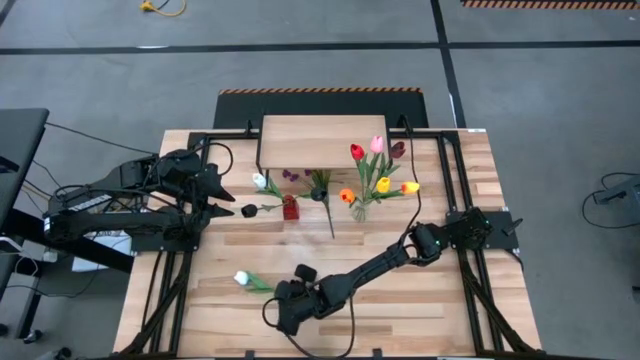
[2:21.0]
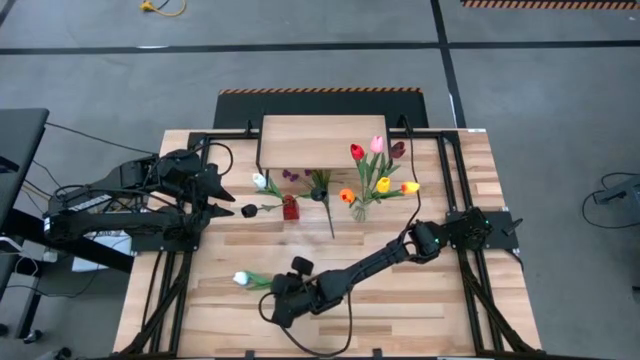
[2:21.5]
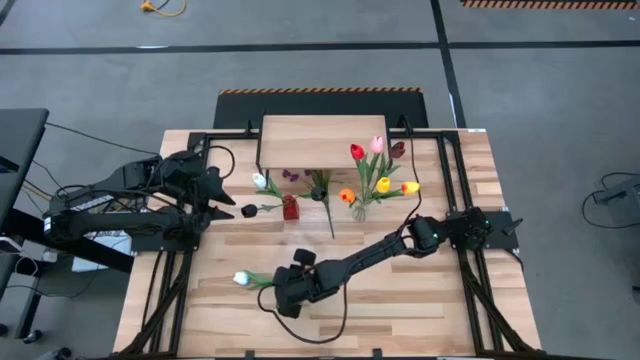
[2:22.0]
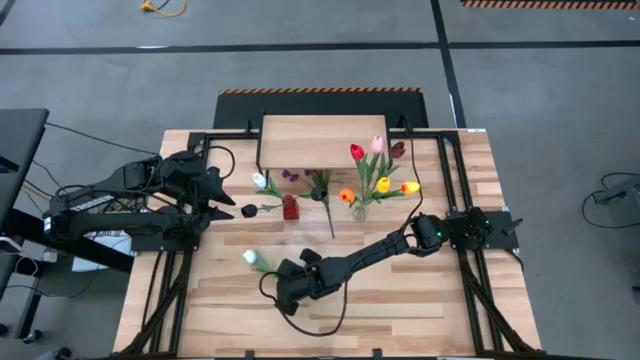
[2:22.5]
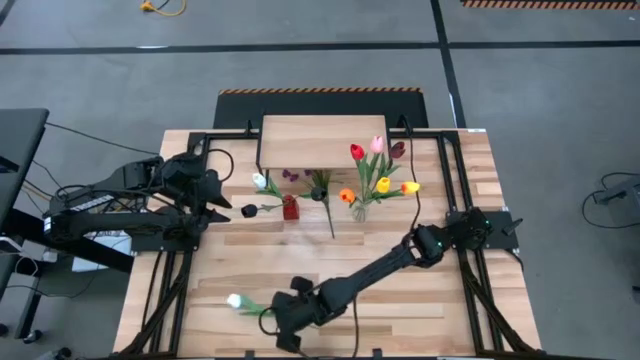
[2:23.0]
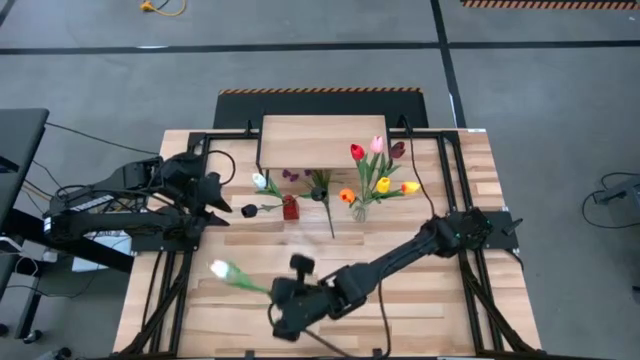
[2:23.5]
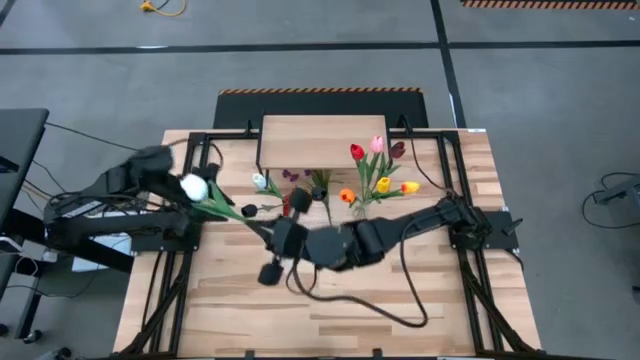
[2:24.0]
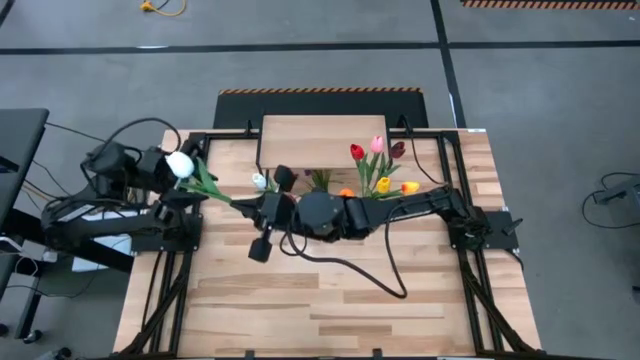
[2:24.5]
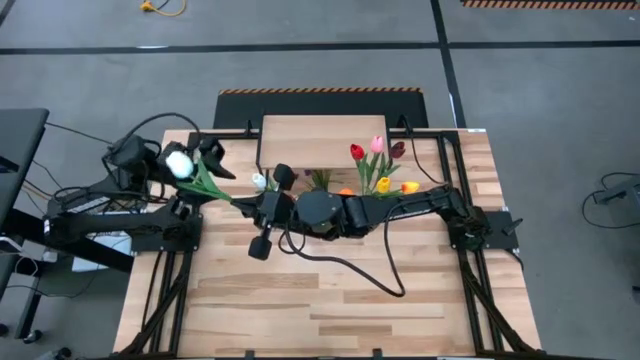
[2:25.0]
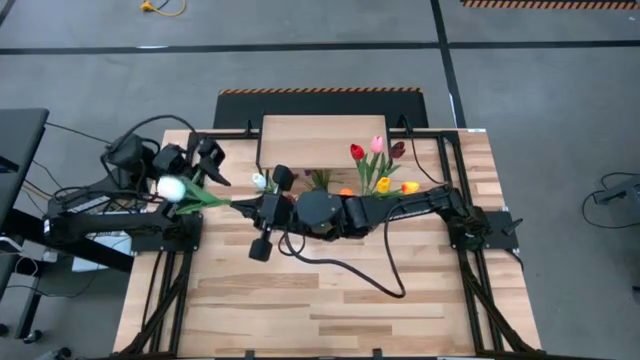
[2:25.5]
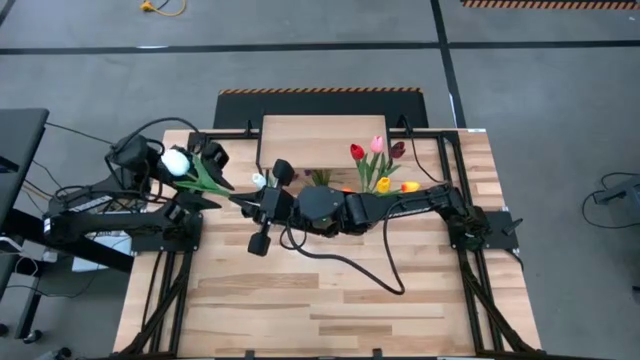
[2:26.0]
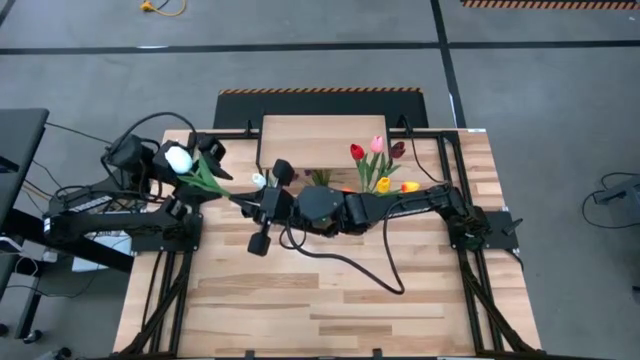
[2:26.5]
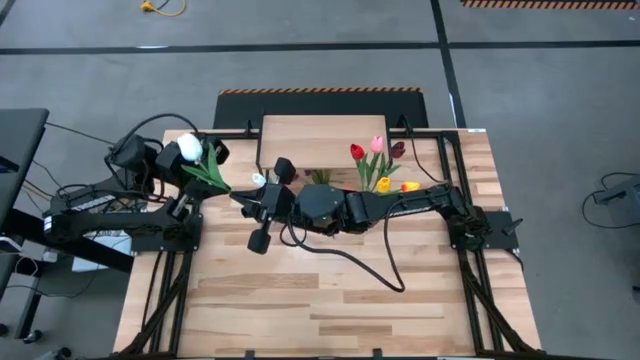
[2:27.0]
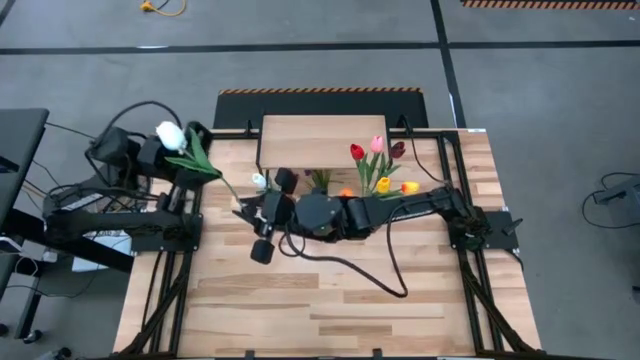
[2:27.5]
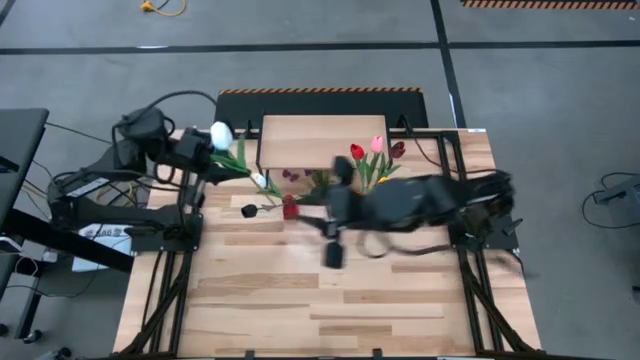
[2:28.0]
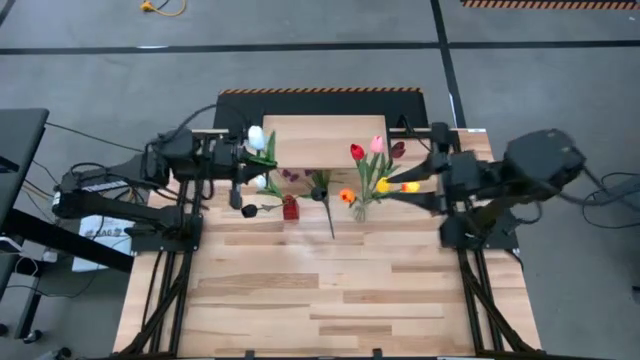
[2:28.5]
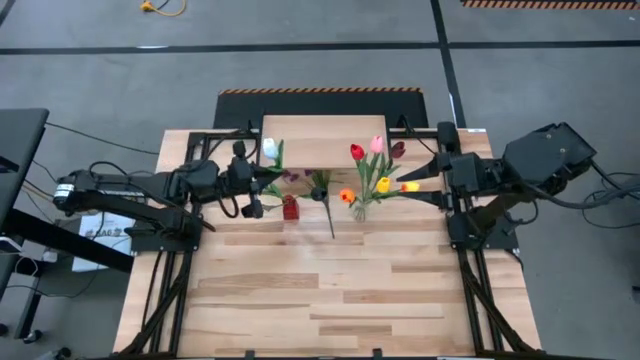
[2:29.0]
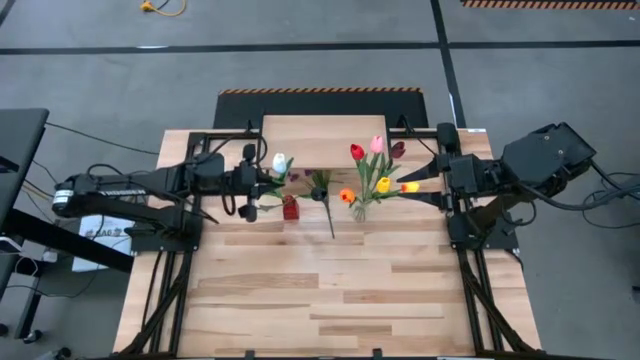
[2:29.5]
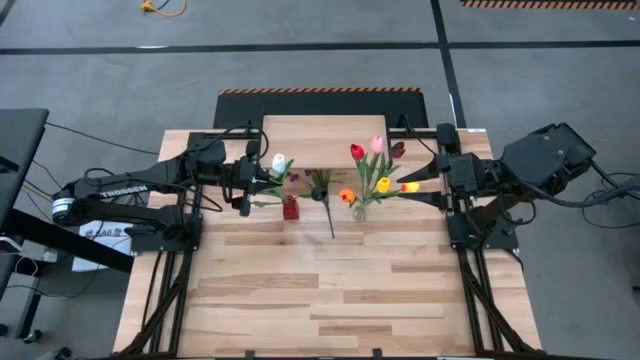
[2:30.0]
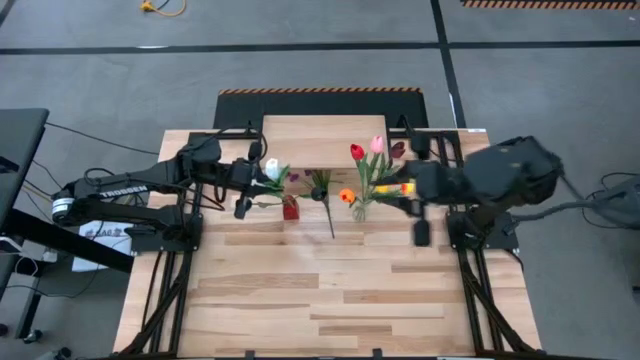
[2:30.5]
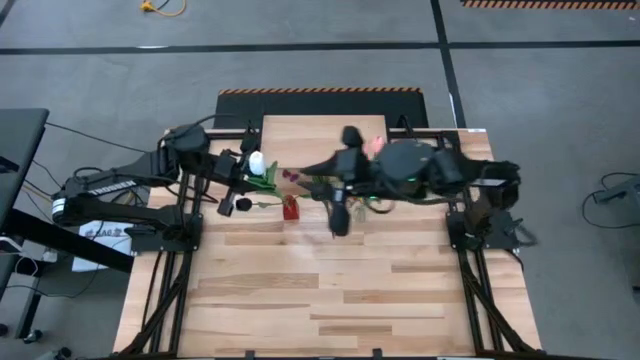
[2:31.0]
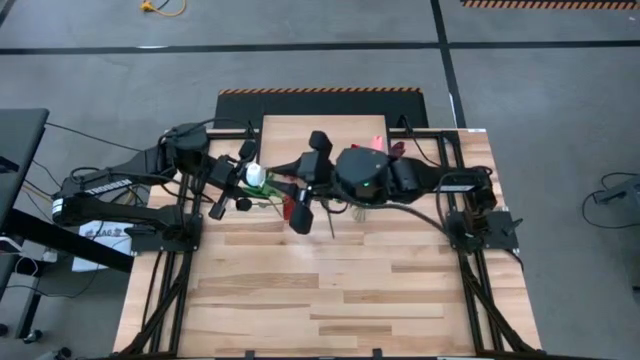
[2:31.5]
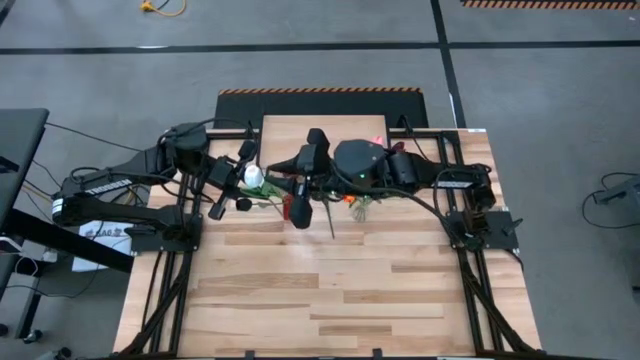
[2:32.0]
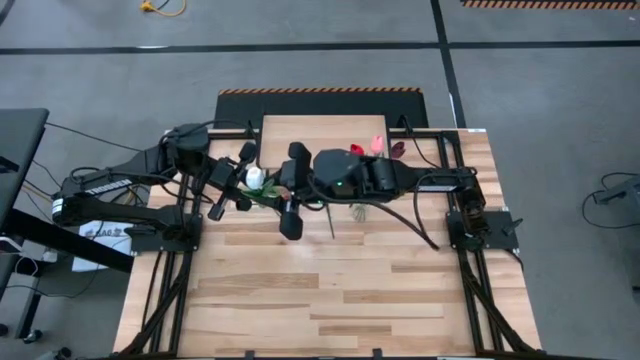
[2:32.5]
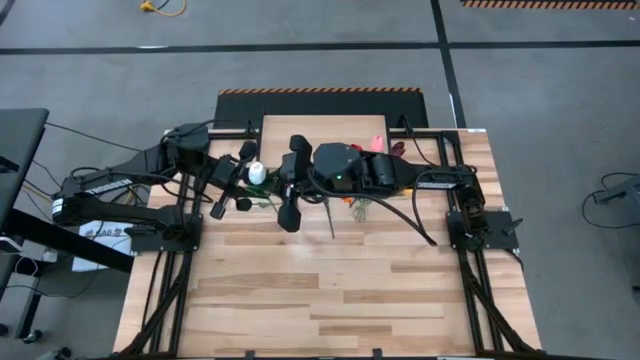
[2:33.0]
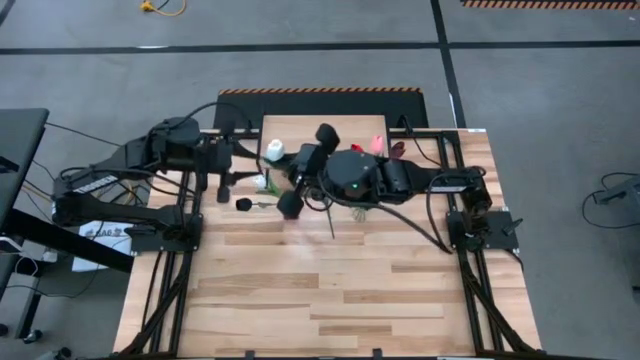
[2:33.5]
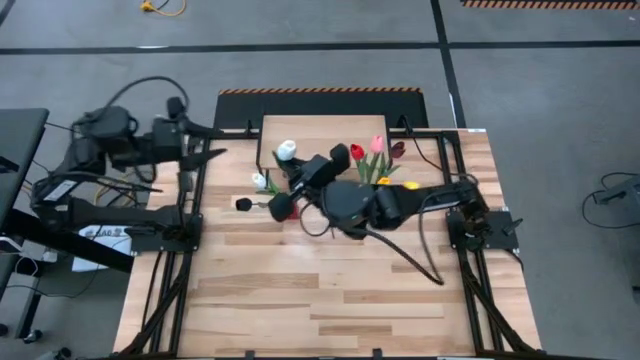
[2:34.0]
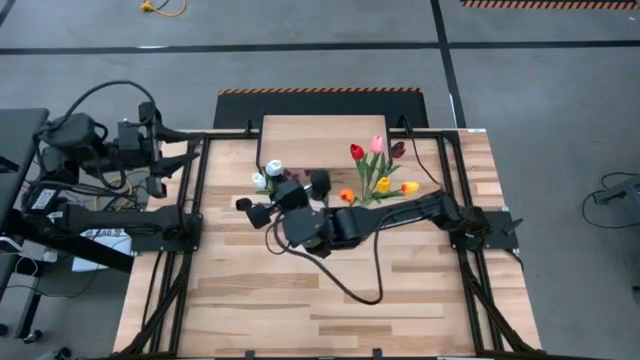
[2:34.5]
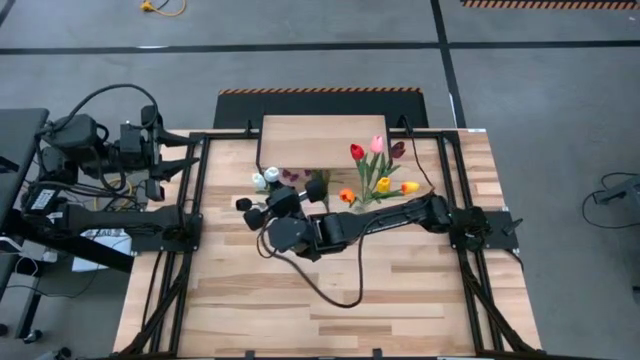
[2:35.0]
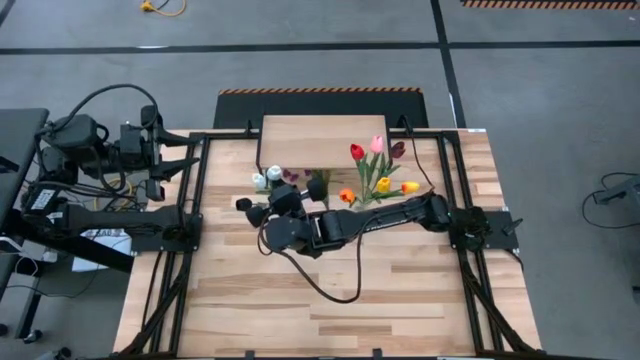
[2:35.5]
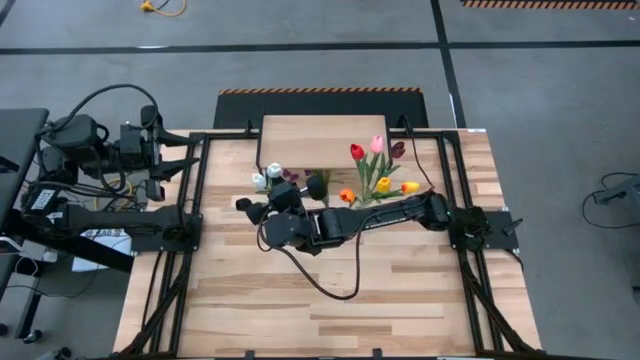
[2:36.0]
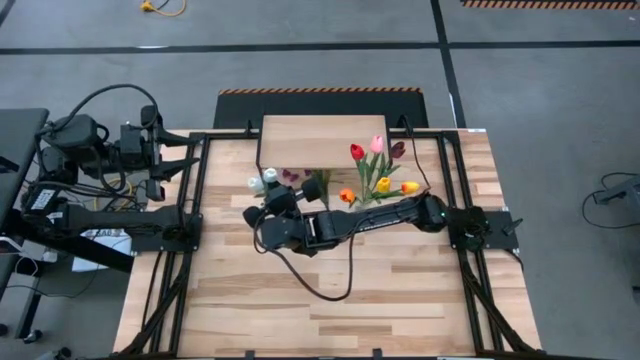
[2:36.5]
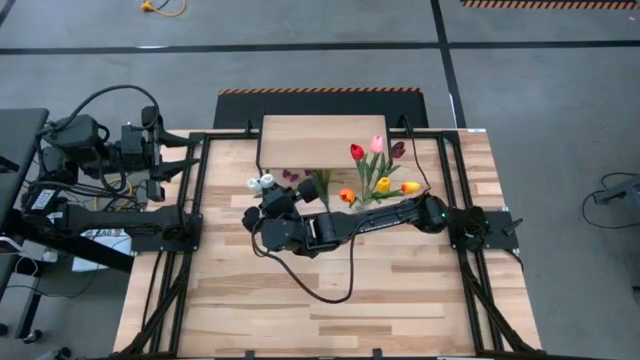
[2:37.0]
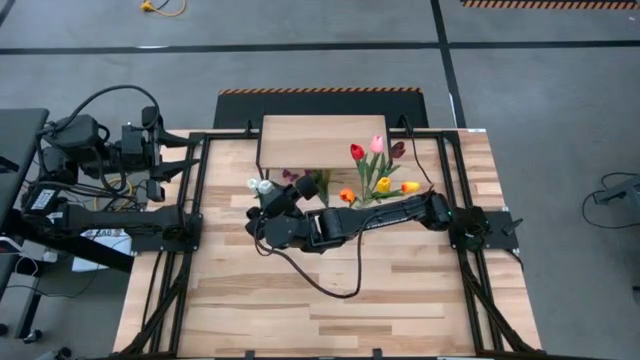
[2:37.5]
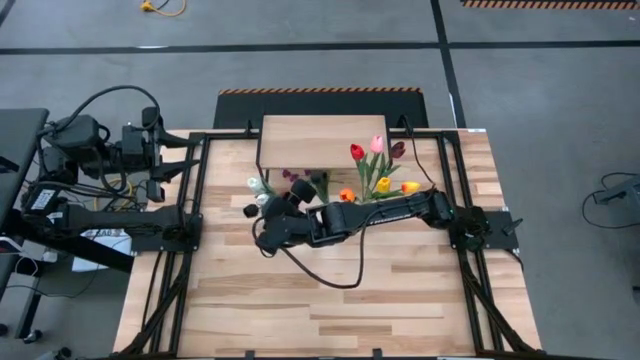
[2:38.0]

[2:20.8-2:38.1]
Task: Pick and place flowers into a vace then onto a shelf
Put the white tulip into the red vase

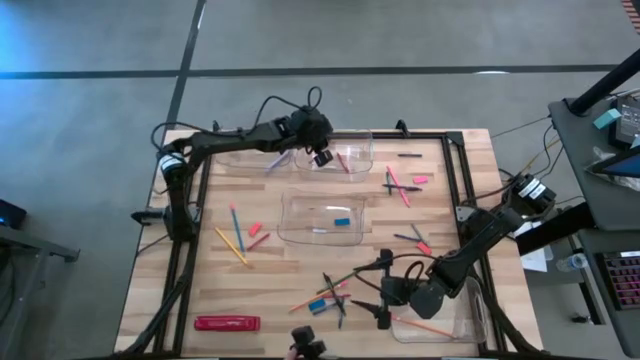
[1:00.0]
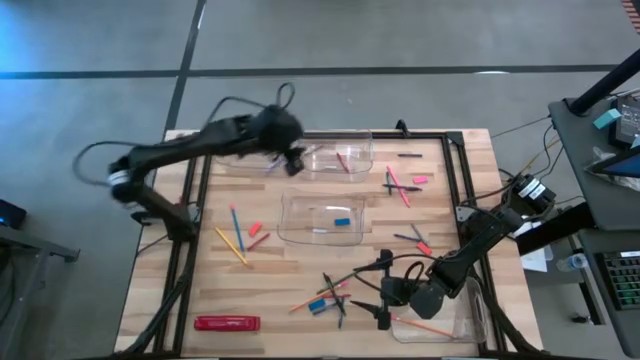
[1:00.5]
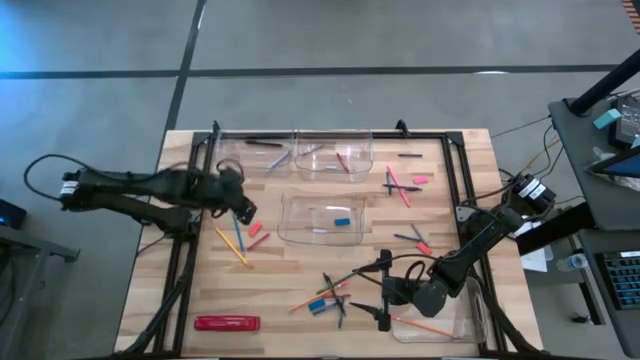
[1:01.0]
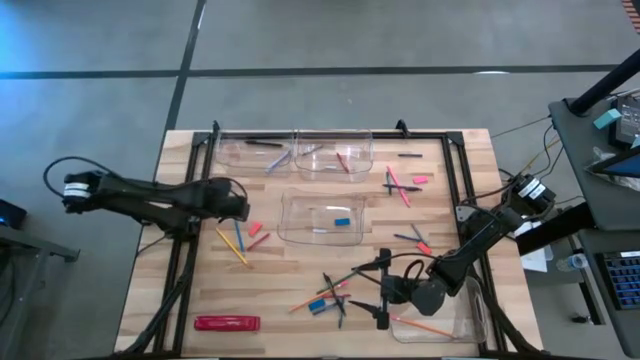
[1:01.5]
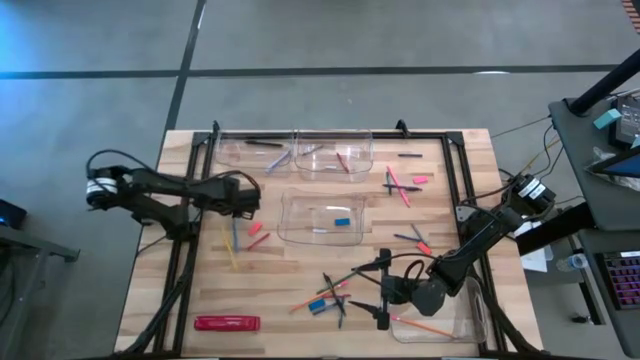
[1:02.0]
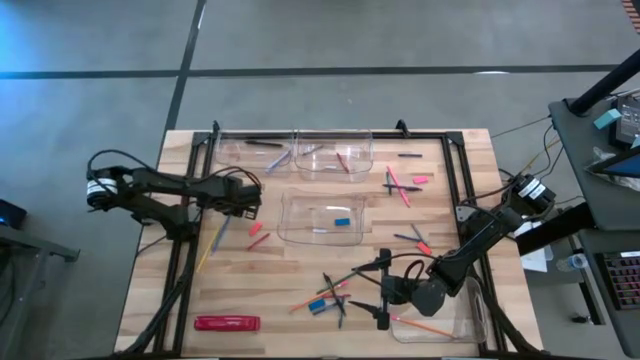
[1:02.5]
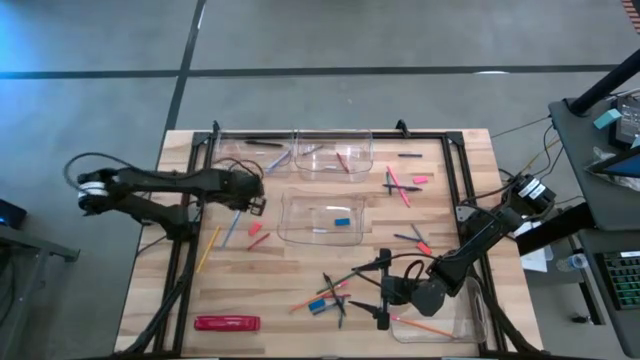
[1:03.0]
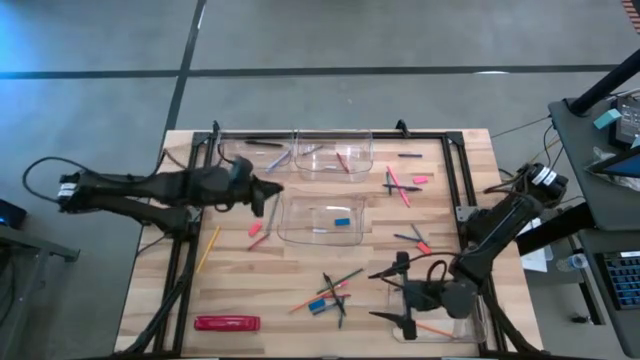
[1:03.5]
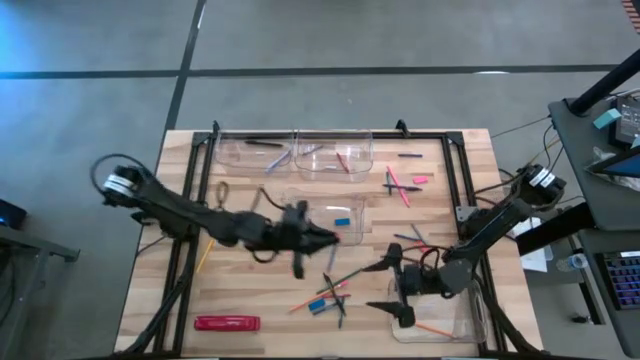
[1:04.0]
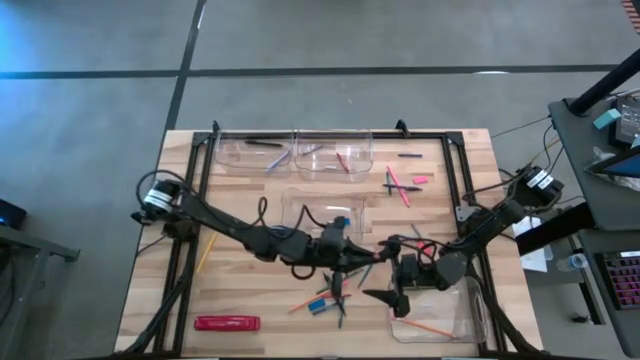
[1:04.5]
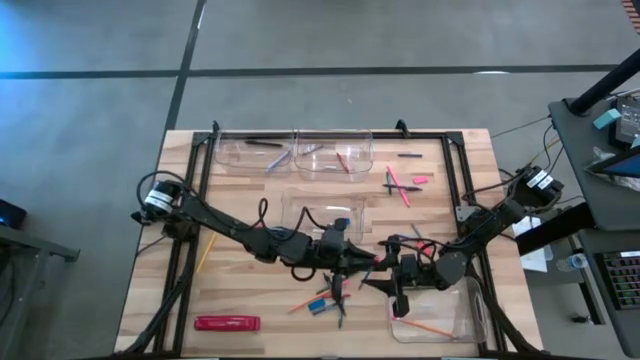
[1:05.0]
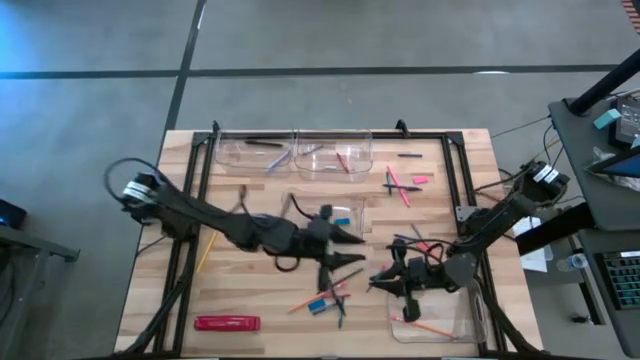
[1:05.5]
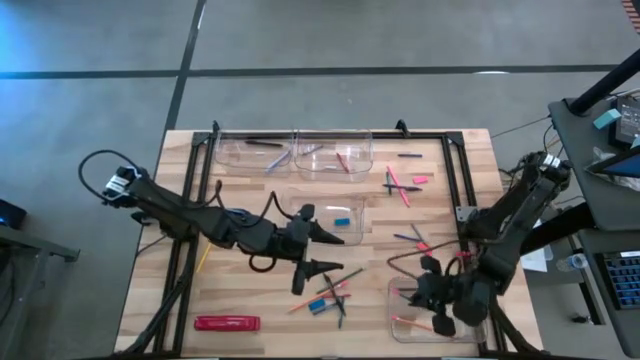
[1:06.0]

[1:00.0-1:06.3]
Task: Sort crayons/erasers/pens/pencils in bins
Put the blue pencil into the bottom transparent bin
